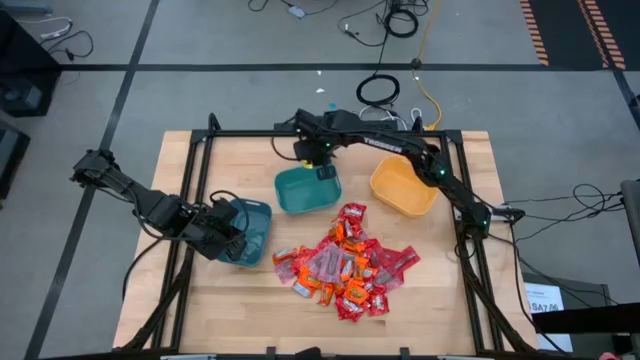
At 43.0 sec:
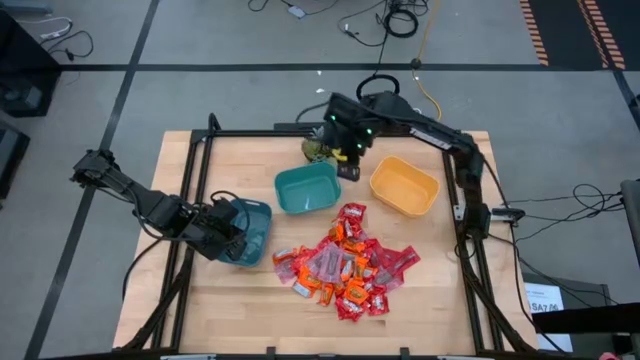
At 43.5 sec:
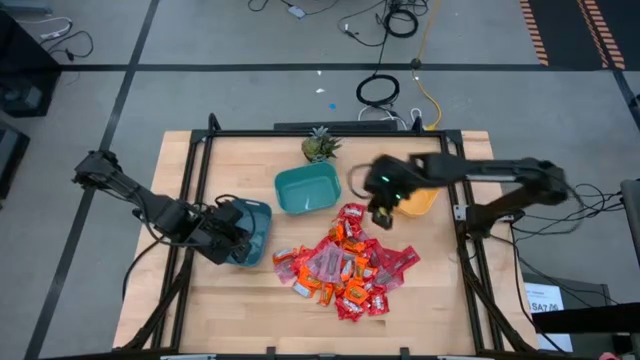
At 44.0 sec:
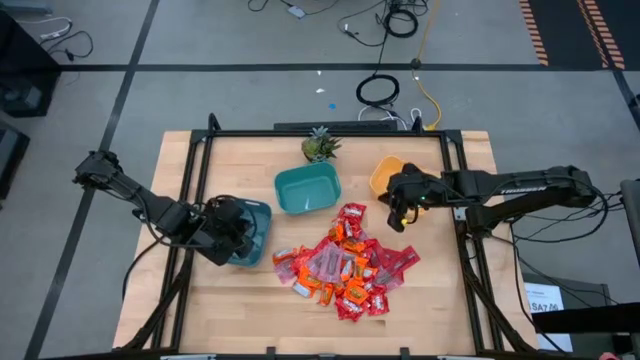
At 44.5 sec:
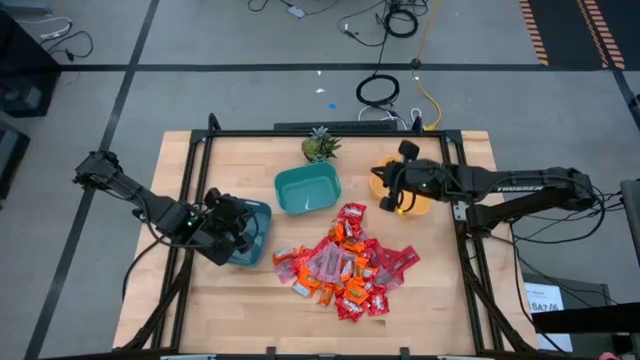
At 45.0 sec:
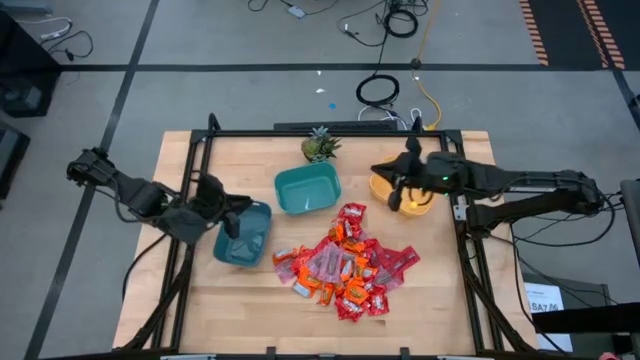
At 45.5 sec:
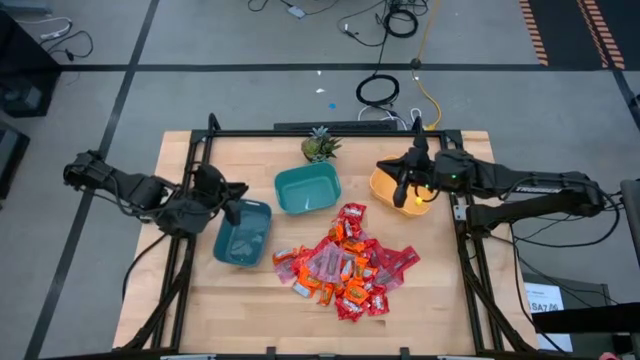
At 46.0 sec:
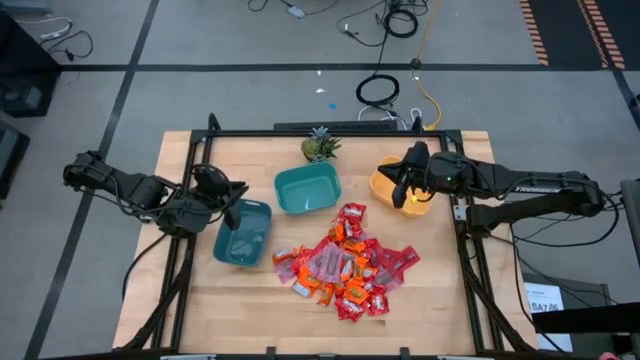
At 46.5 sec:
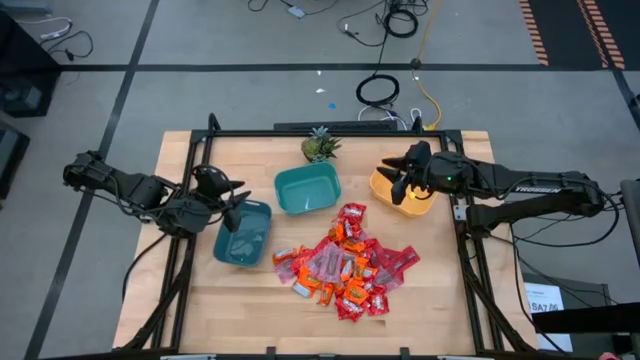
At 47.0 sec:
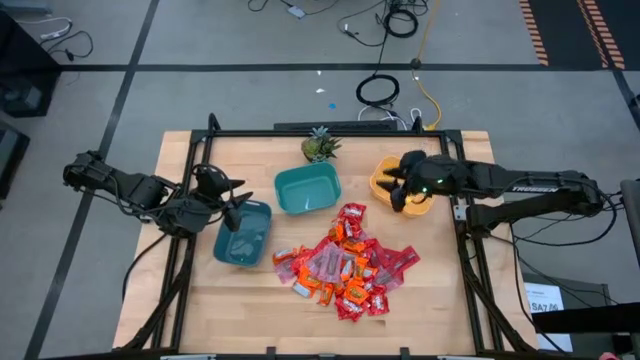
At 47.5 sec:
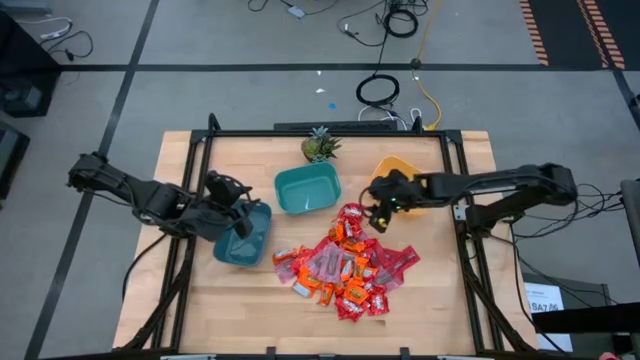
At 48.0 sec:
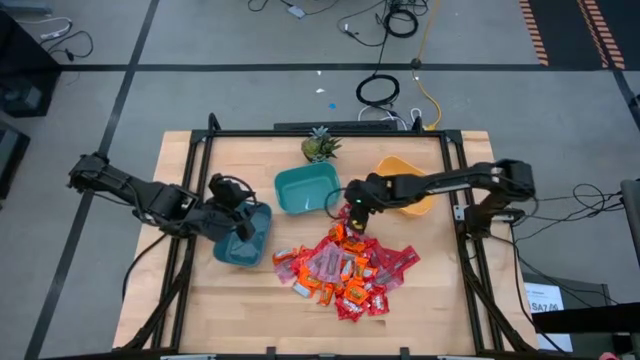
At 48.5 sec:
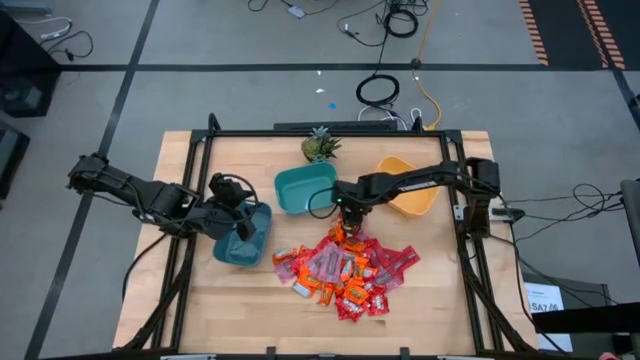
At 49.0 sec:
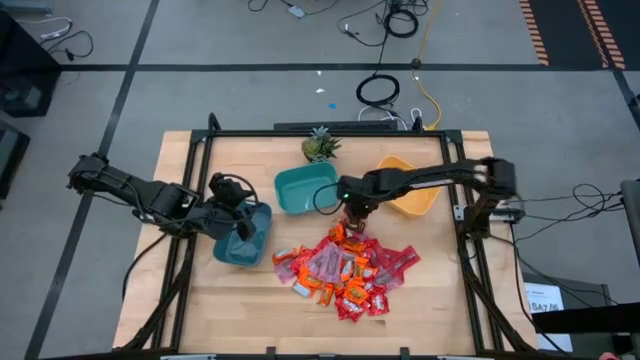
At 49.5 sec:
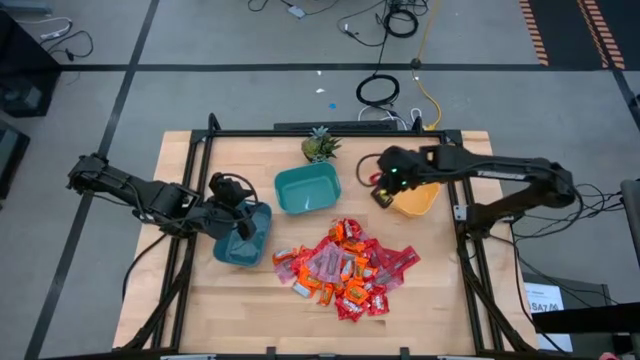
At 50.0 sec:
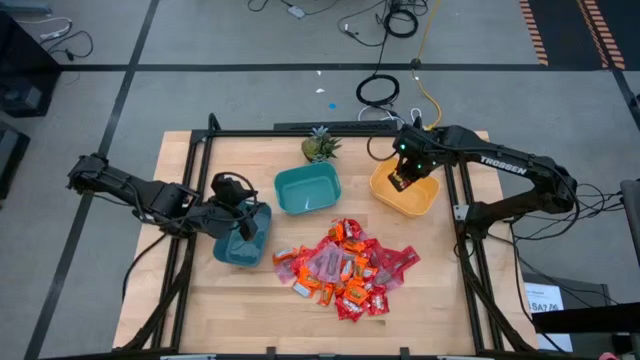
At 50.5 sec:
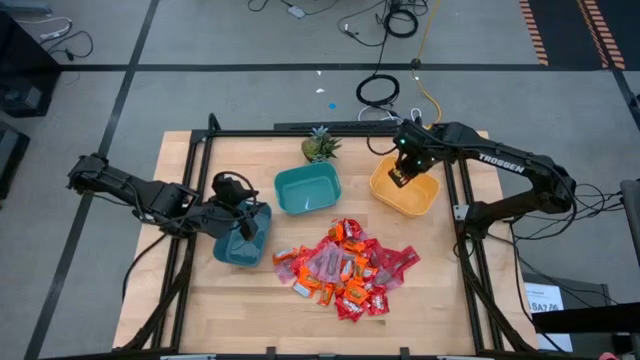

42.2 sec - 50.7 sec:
Task: Sort candy
Put the red candy into the yellow bin

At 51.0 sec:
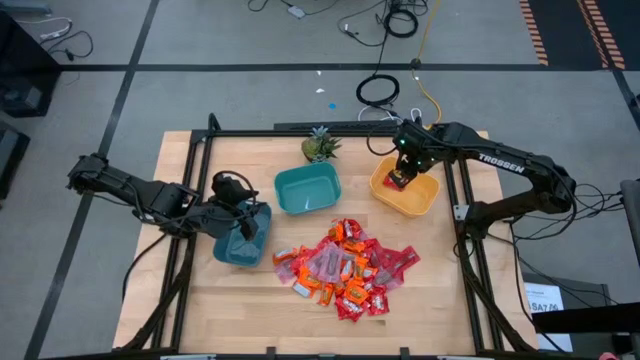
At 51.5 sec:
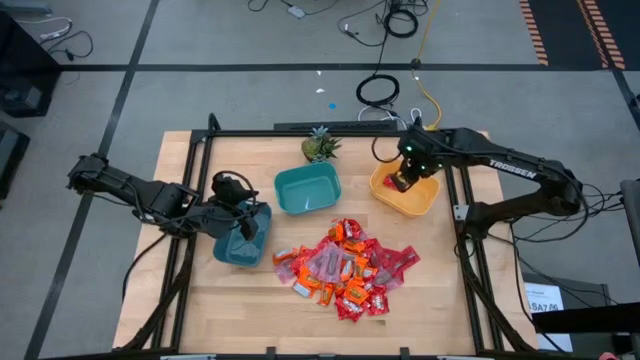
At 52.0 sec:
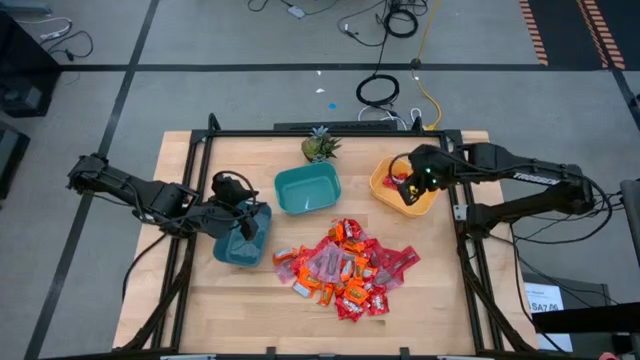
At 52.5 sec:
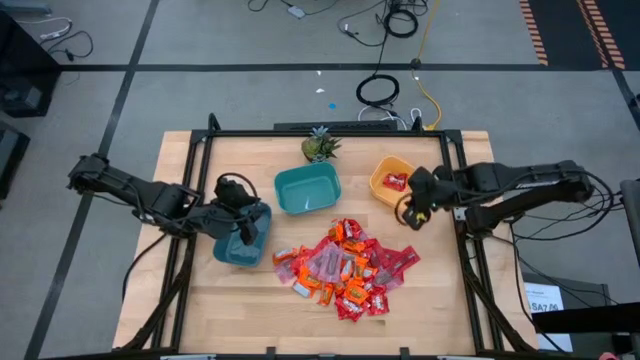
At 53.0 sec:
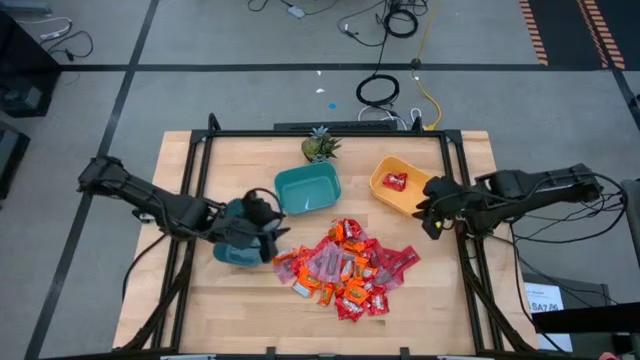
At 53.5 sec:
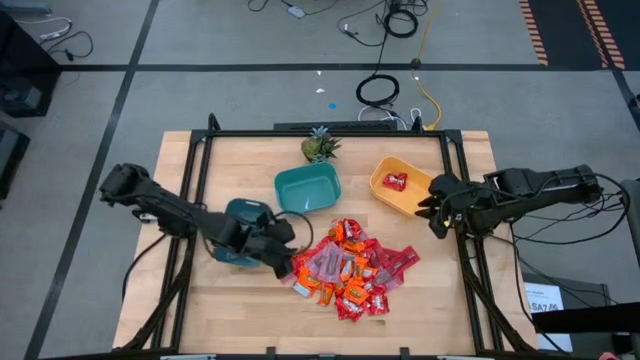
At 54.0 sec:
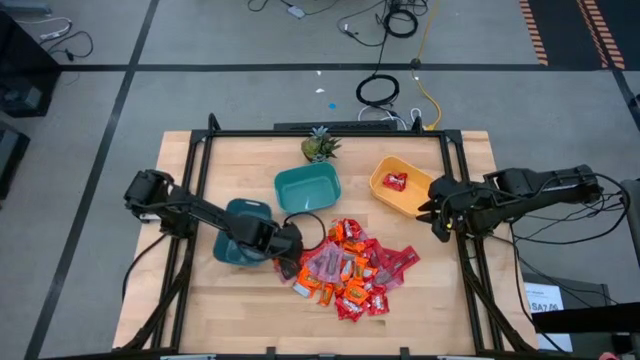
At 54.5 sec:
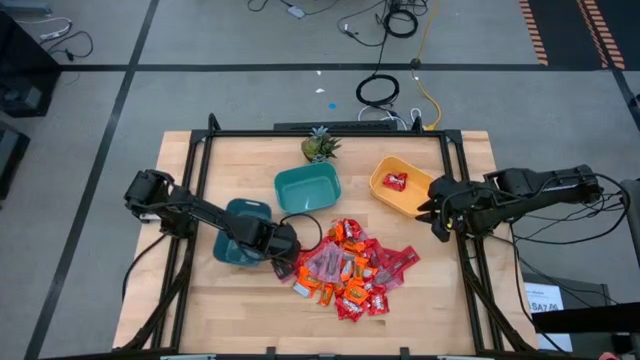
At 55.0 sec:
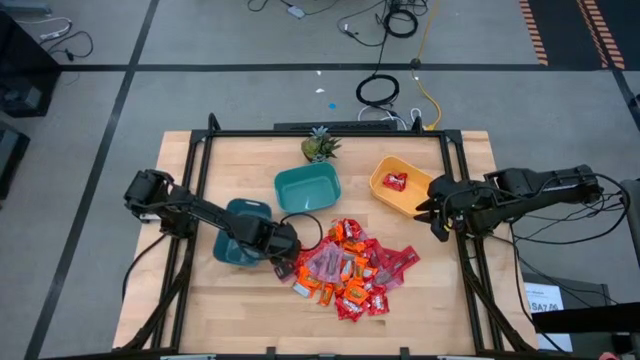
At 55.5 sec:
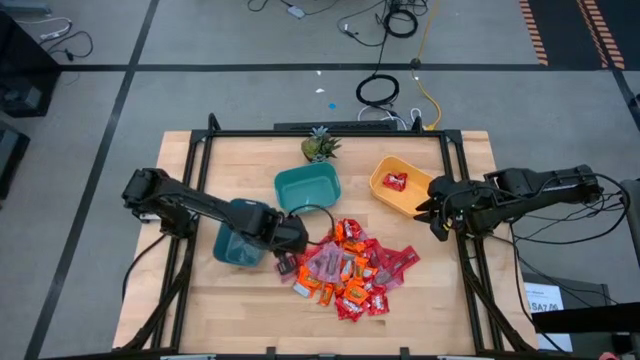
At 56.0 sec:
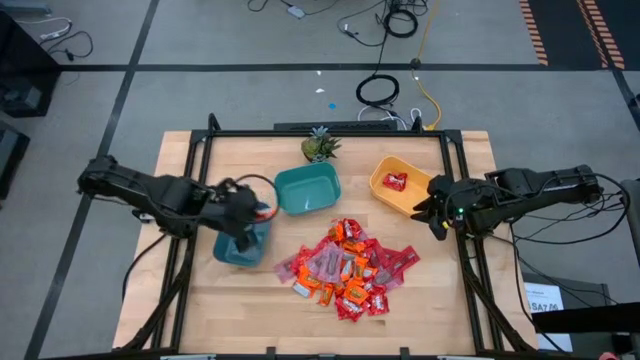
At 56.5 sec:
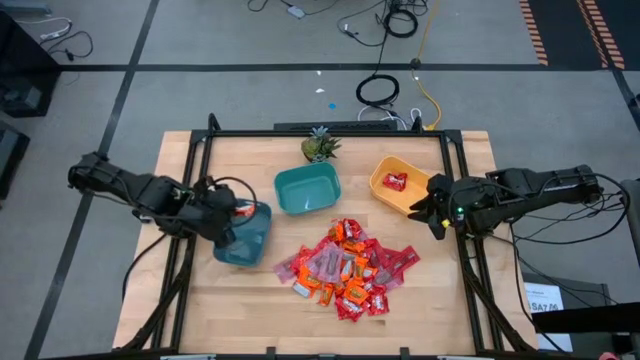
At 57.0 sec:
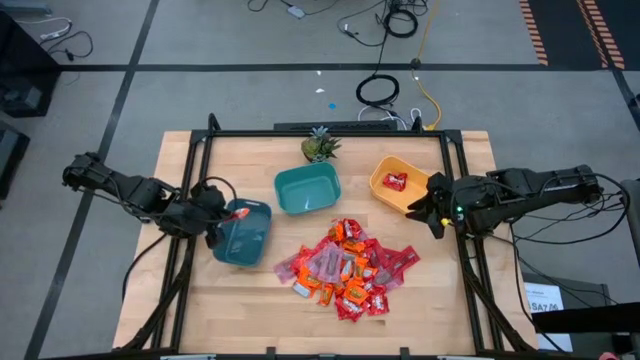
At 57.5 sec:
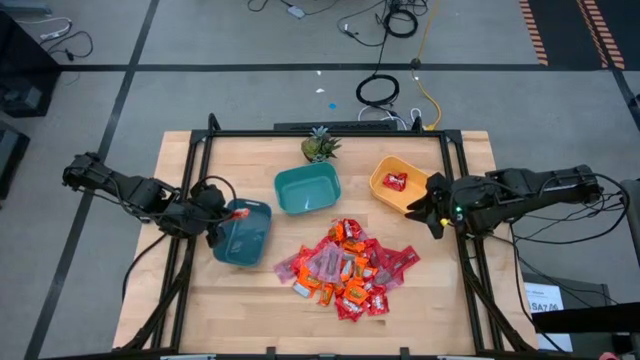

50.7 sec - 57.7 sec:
Put the orange chocolate into the blue bin

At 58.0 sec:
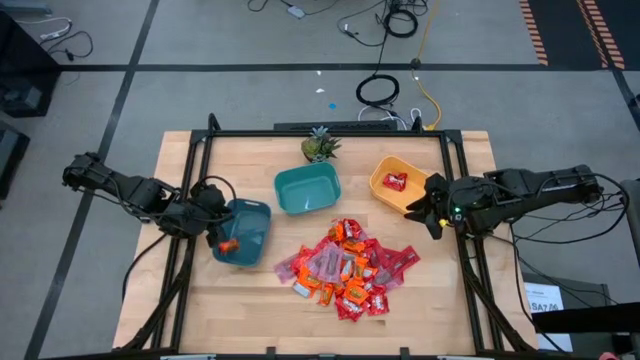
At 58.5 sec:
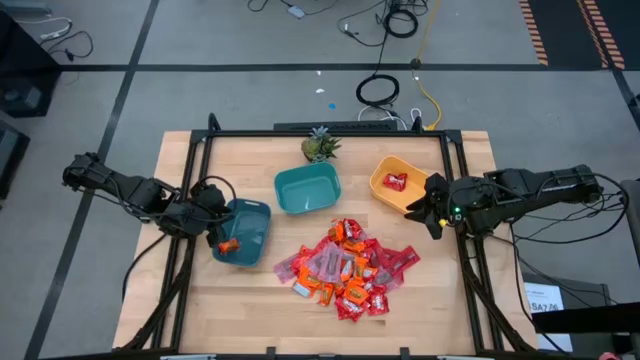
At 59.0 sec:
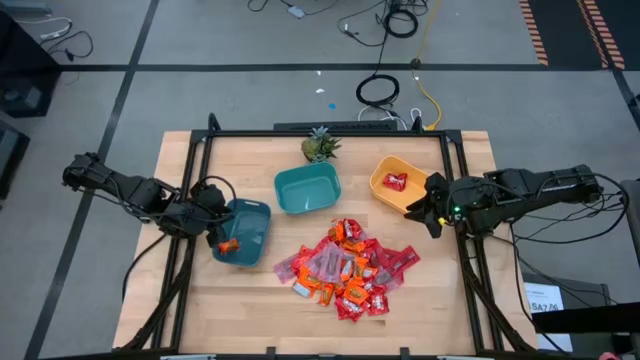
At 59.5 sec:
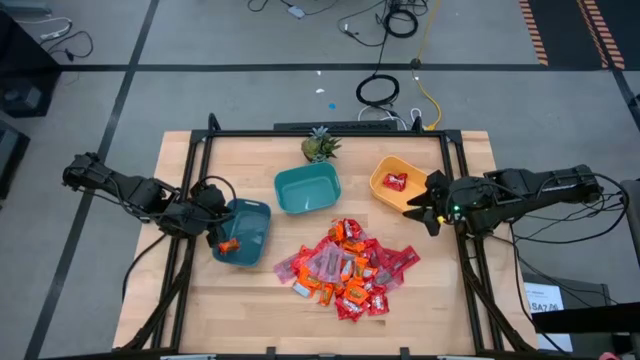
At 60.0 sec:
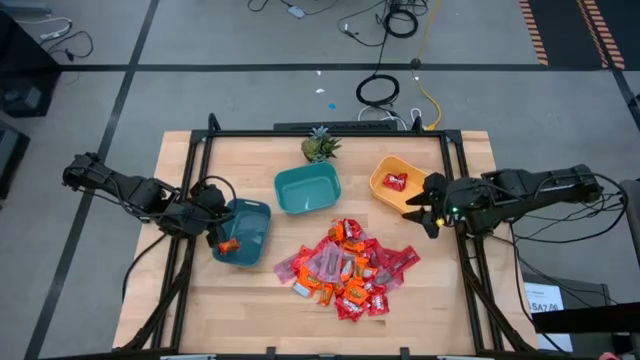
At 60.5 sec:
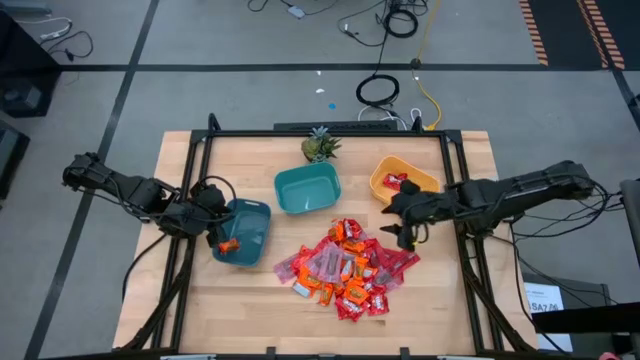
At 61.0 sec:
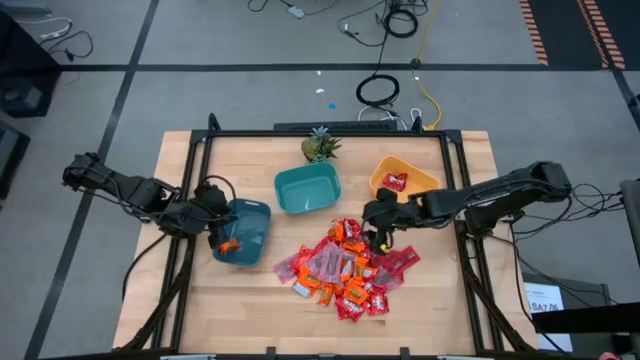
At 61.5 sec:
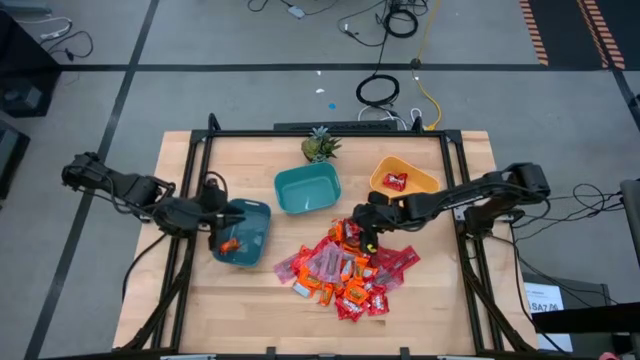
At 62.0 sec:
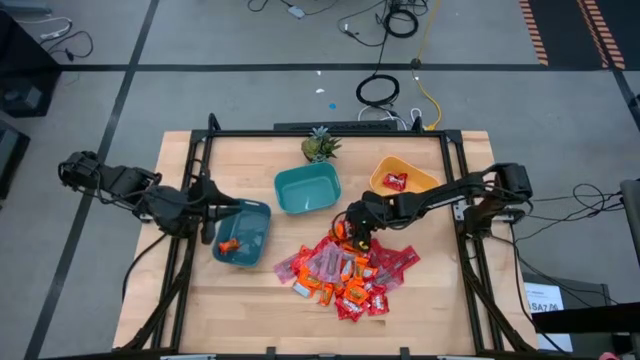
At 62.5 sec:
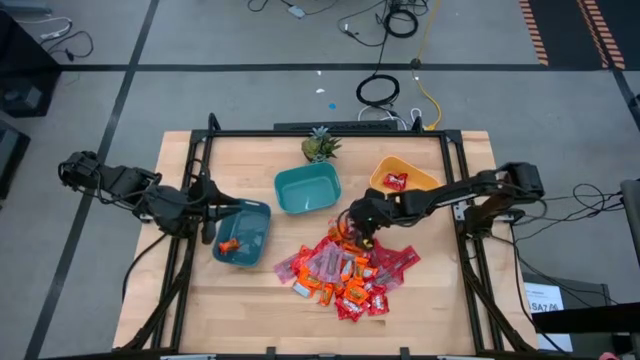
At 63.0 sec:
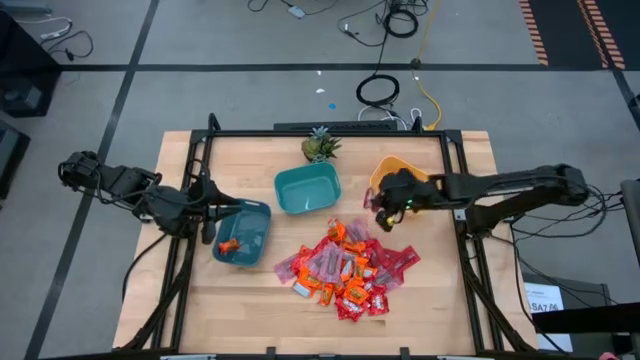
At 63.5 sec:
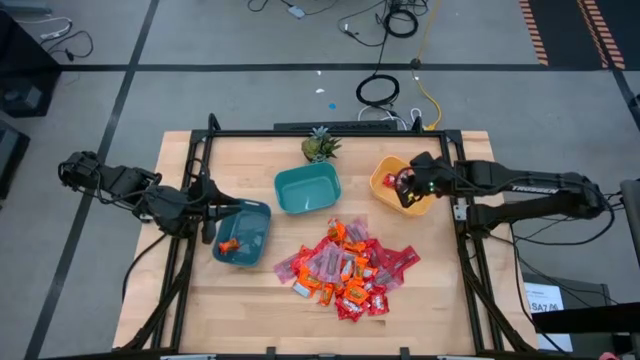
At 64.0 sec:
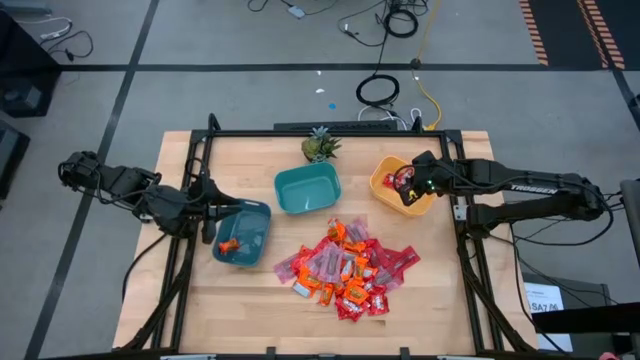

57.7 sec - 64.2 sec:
Put the red candy into the yellow bin
